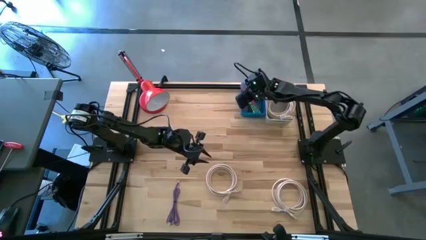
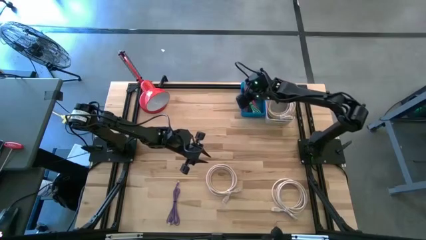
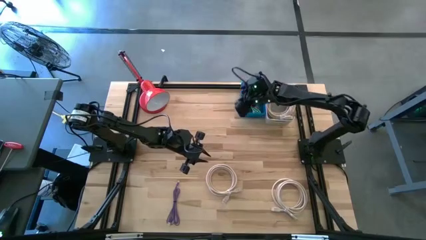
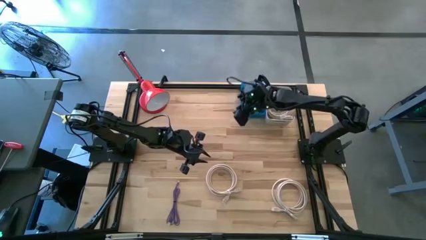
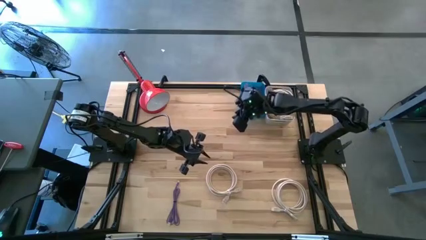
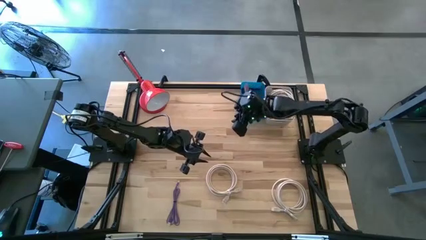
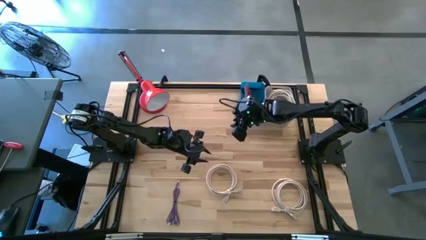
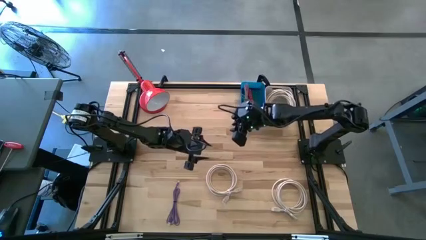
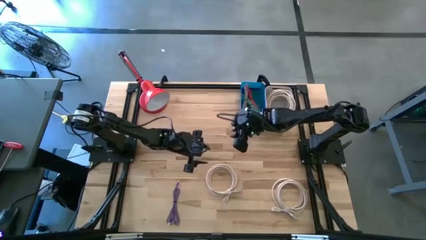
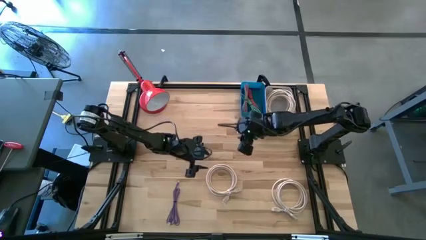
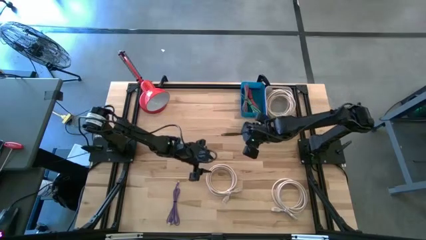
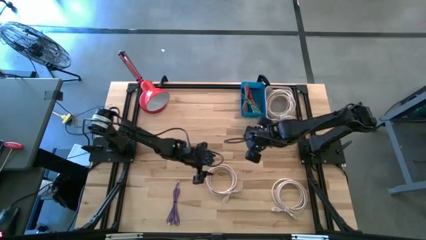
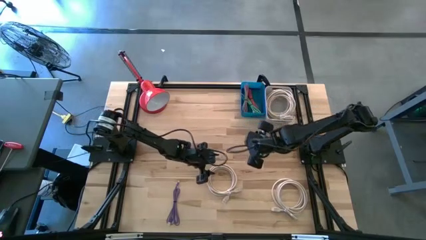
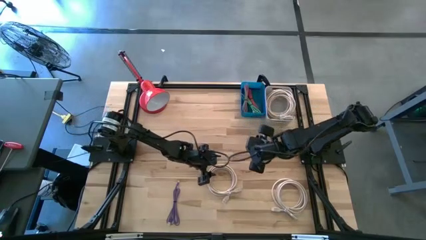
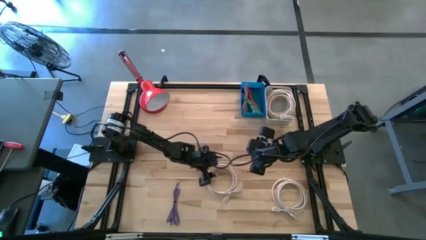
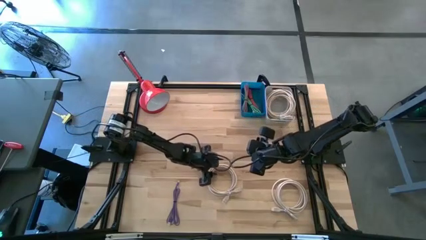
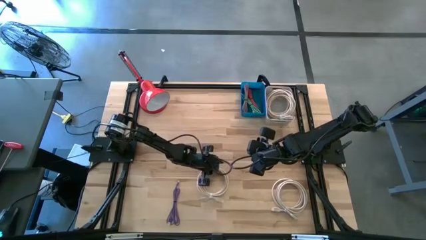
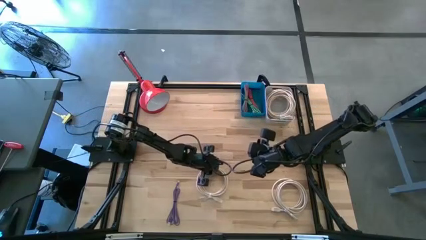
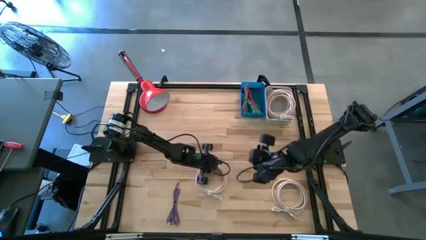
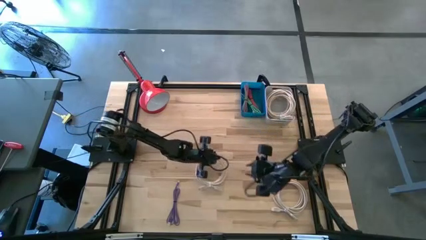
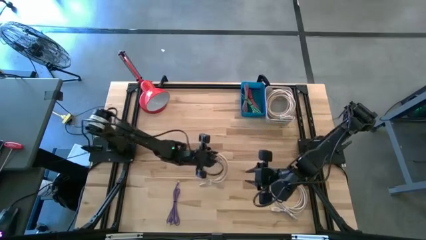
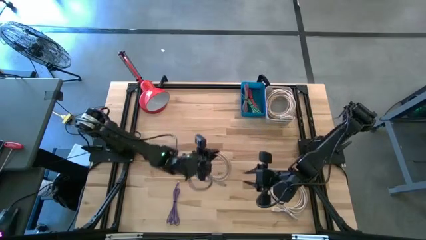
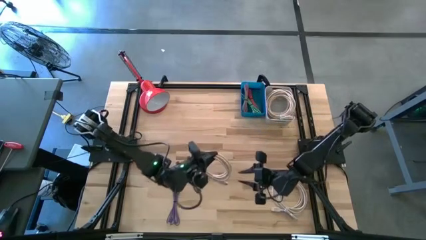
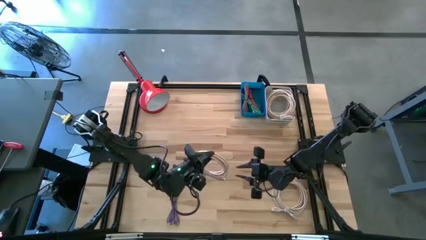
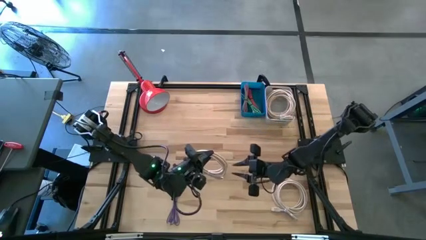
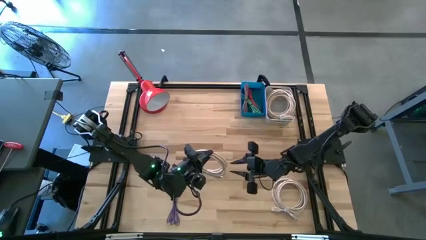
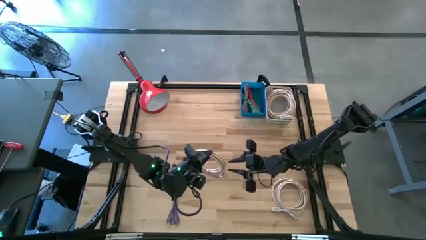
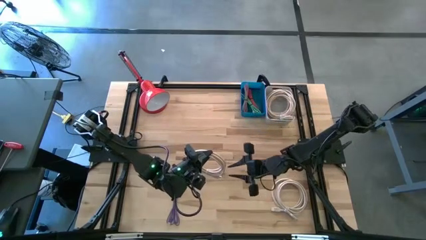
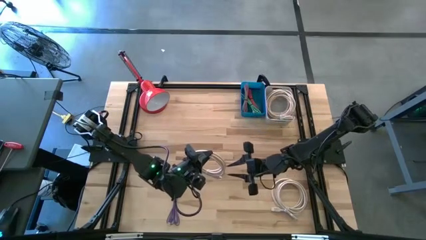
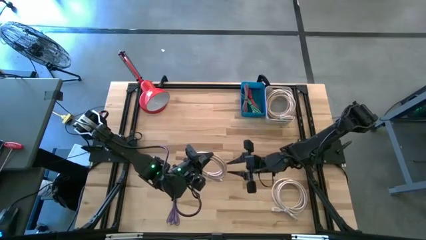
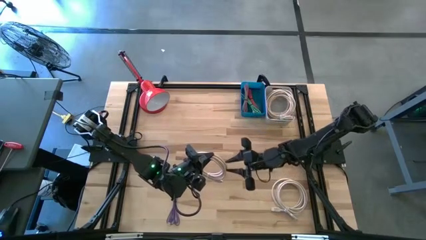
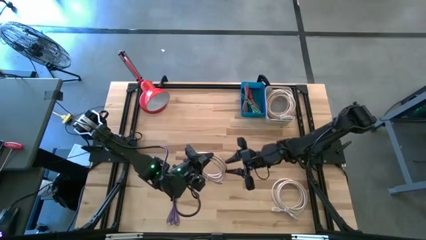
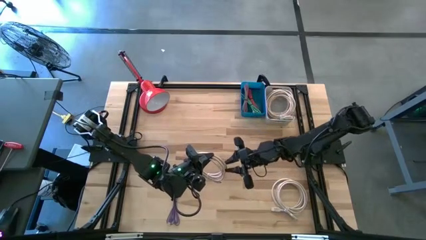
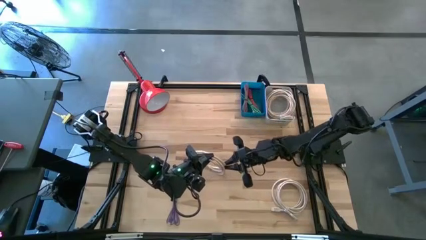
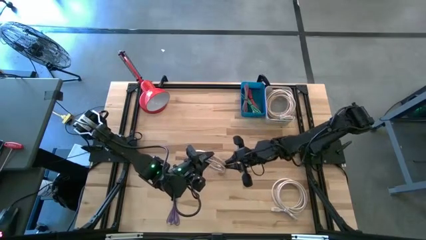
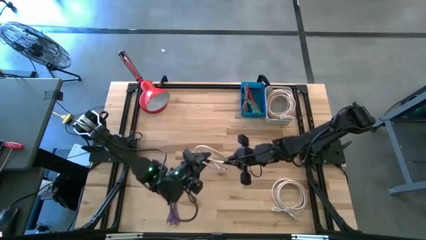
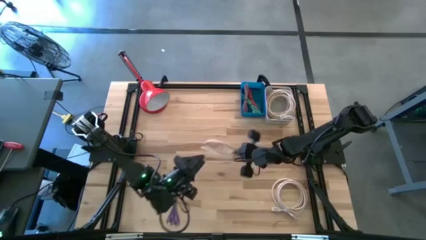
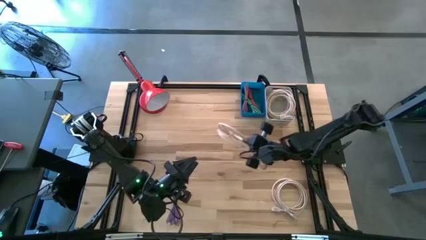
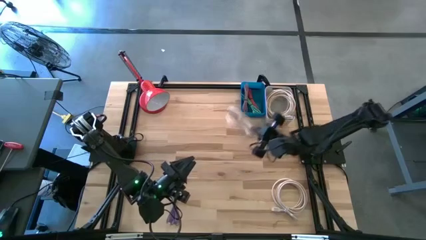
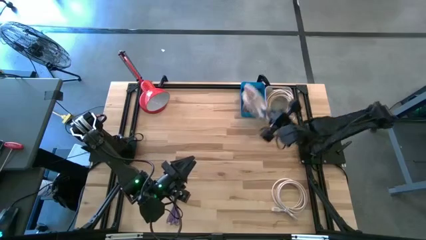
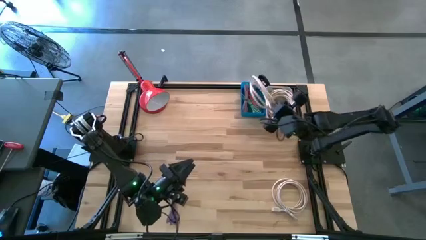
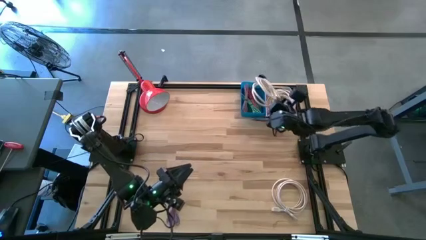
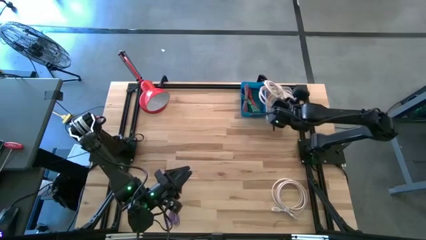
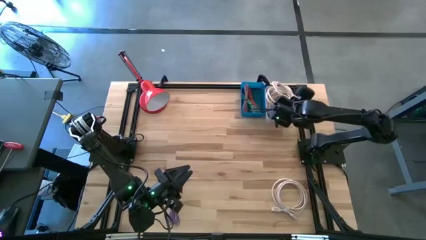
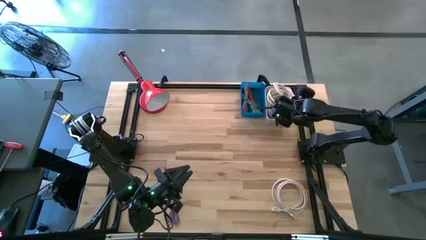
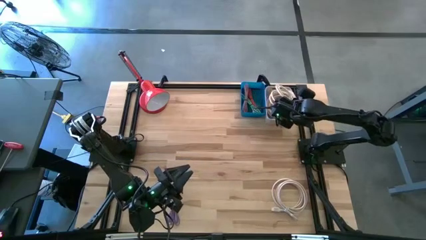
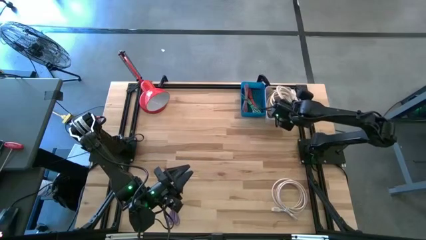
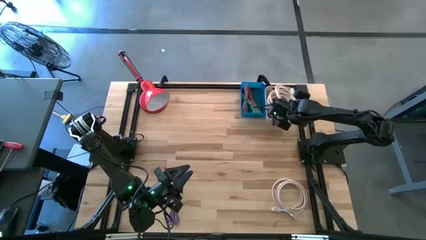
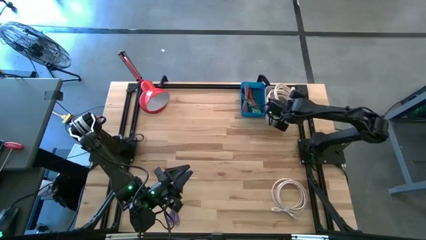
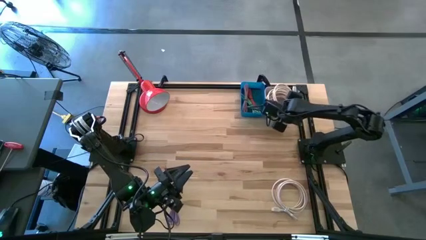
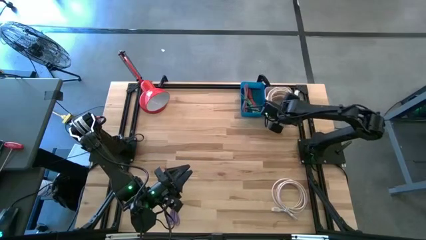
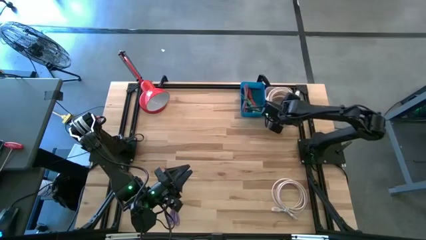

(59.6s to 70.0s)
Task: Pick & Place USB Port
Put the white HDMI cable into the gray bin

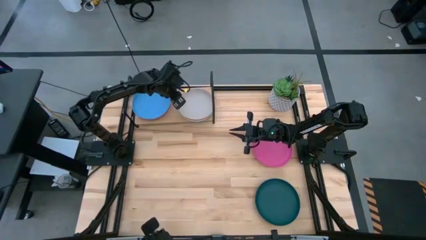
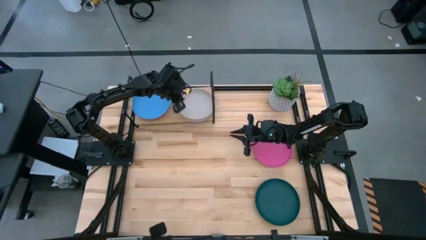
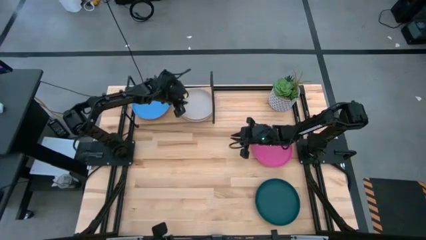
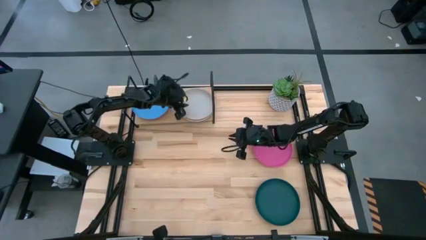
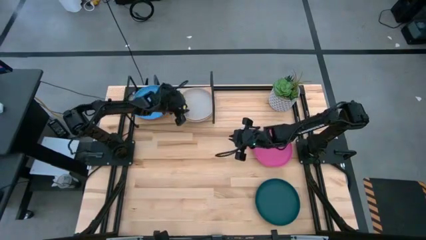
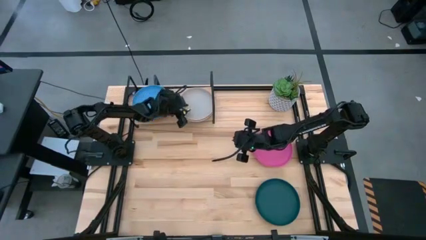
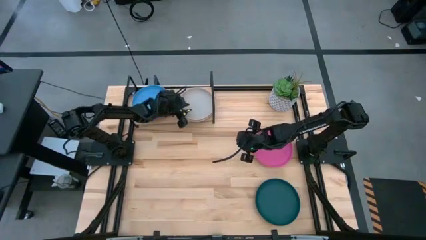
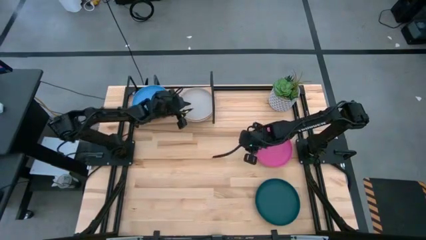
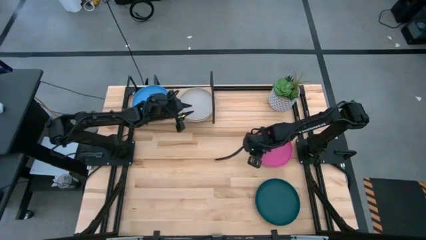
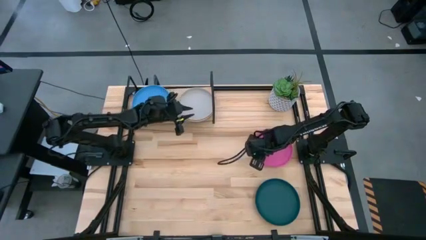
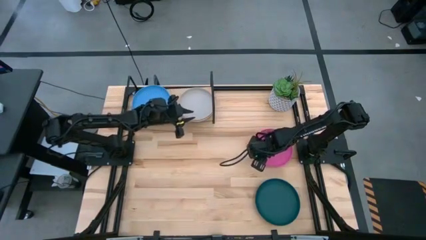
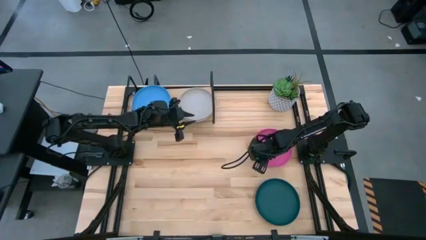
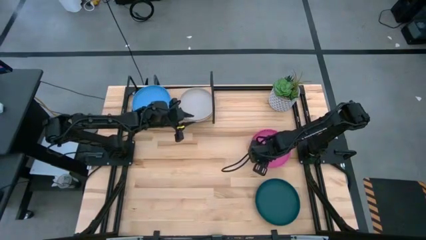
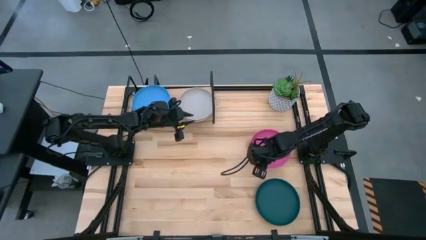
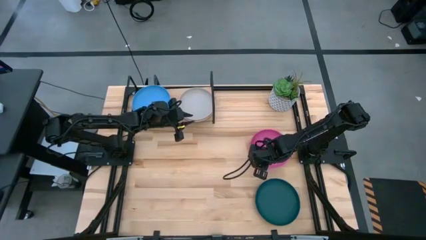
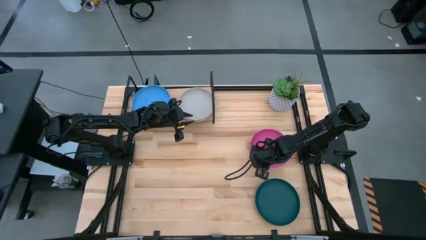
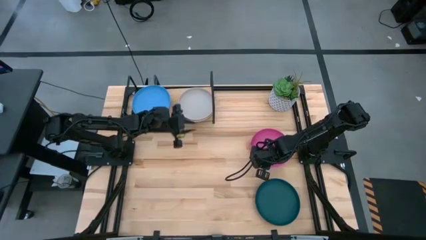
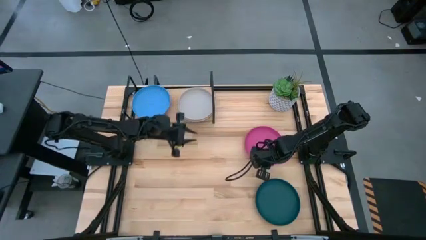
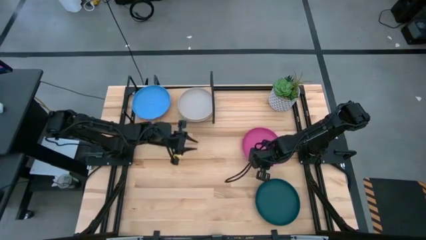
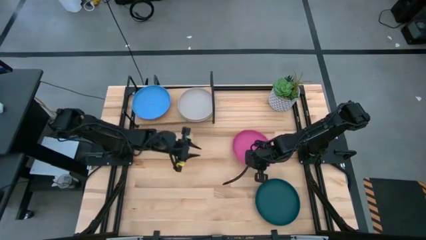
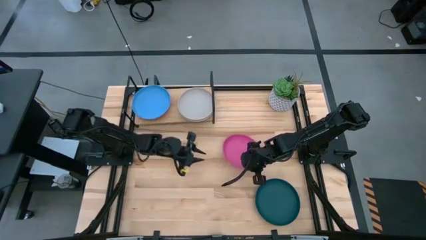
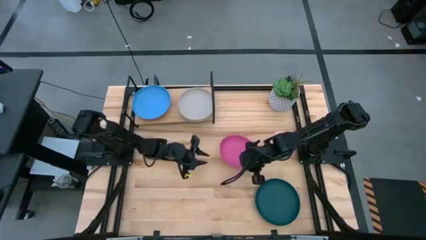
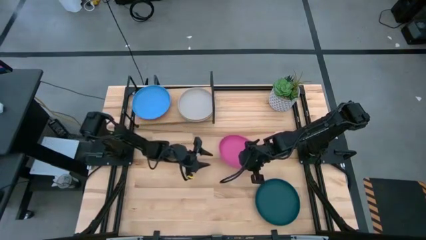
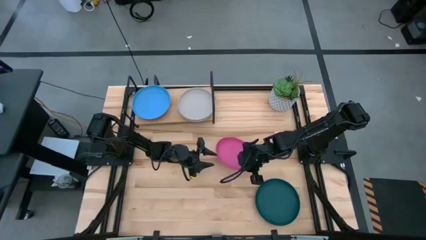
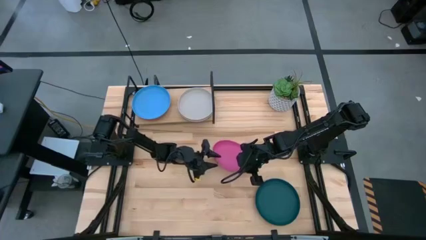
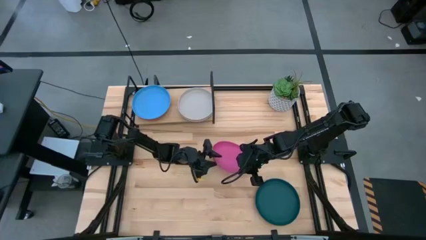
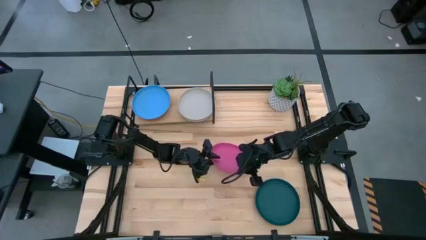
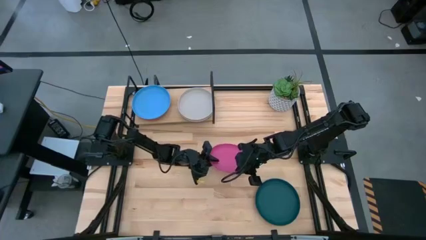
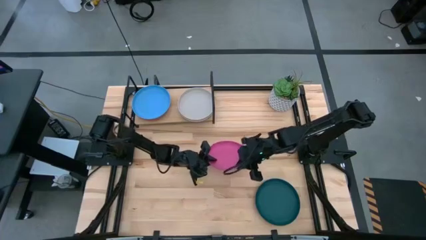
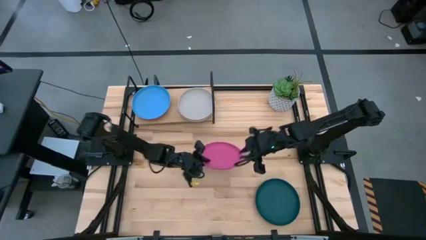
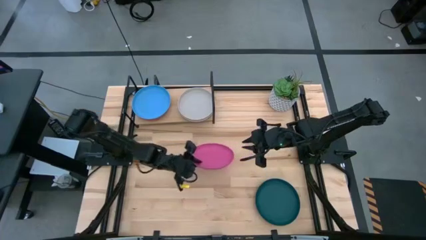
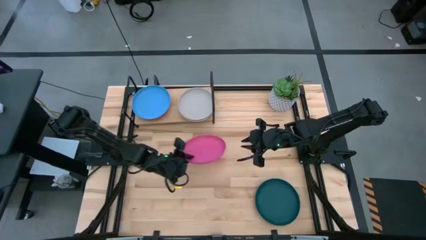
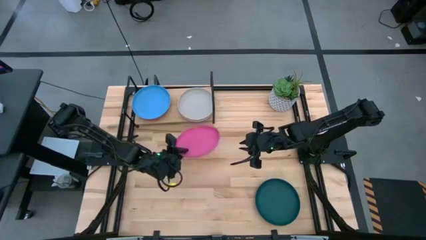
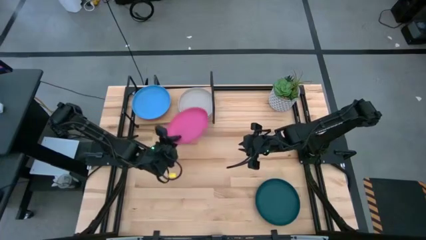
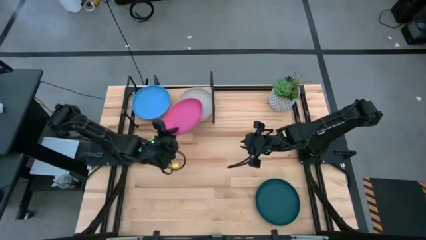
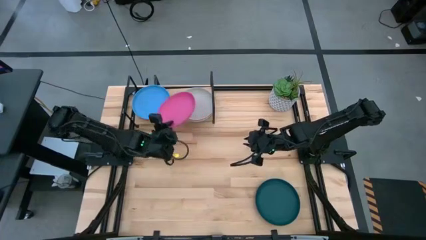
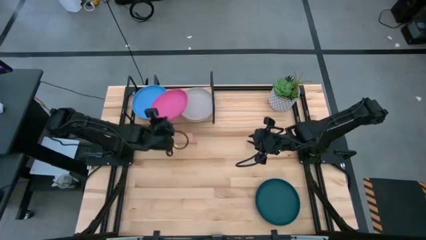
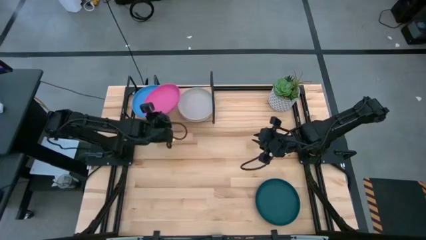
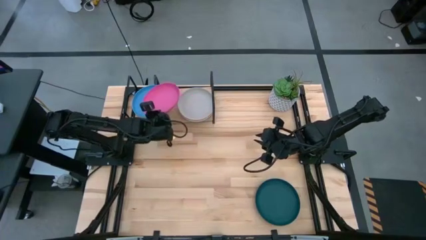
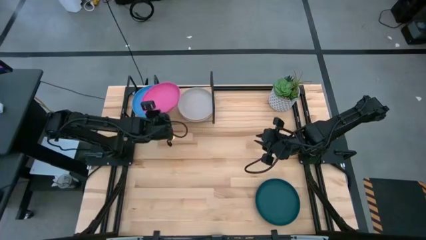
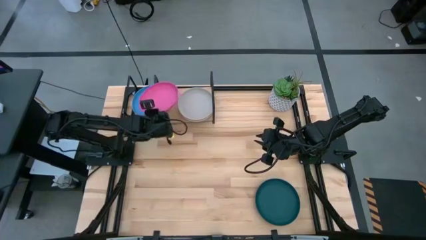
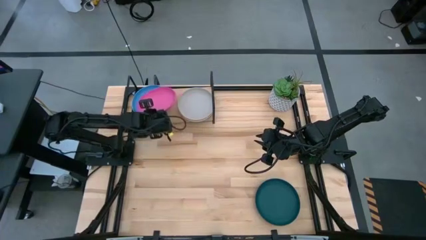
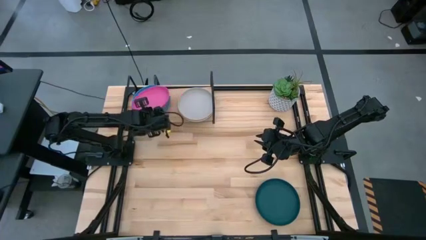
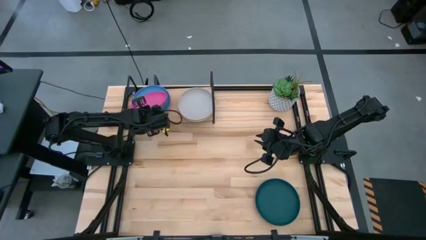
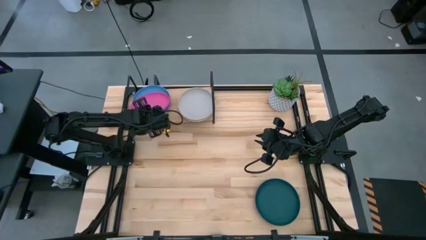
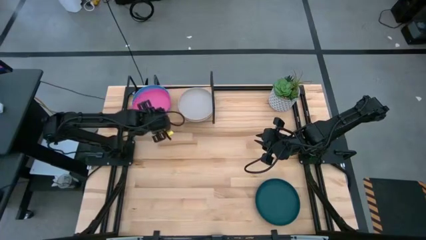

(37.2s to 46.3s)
Task: Place and stack plates onto a shelf
Stack the pink plate on top of the blue plate on the shelf
